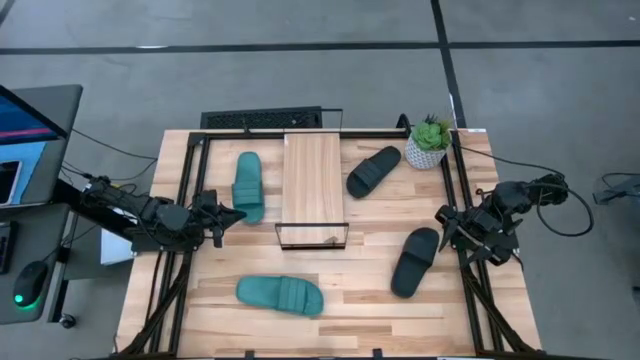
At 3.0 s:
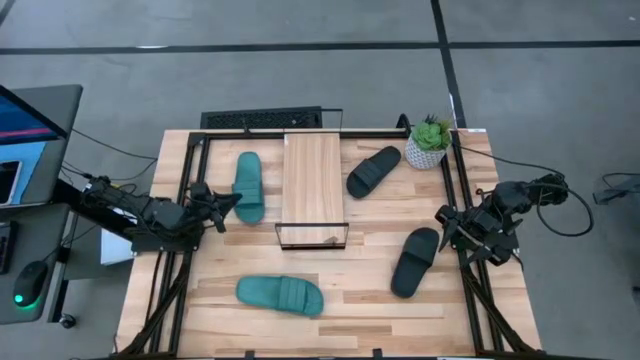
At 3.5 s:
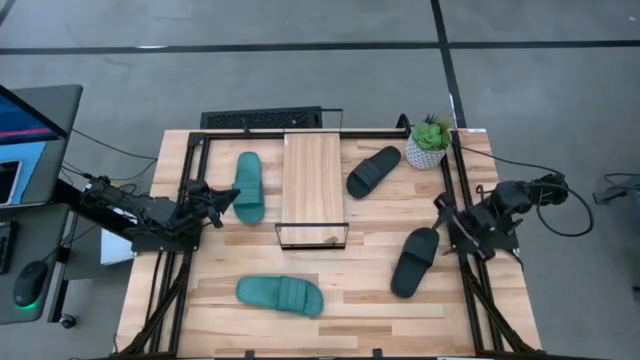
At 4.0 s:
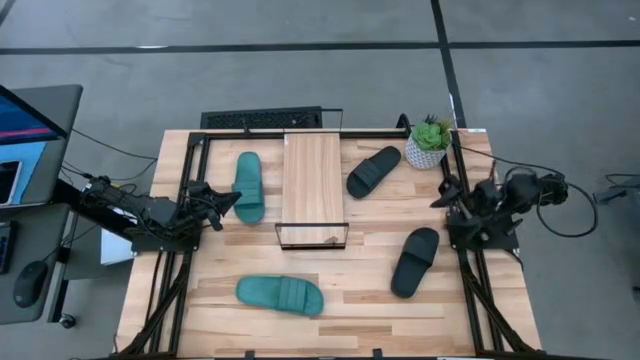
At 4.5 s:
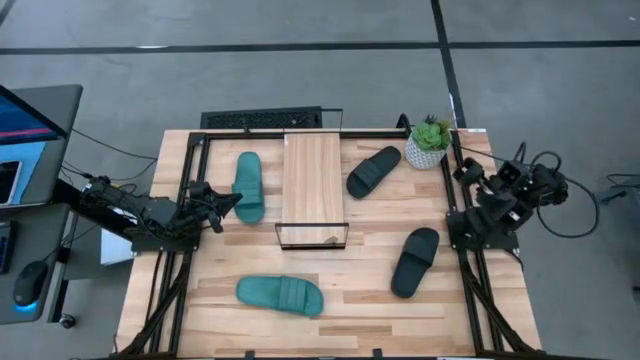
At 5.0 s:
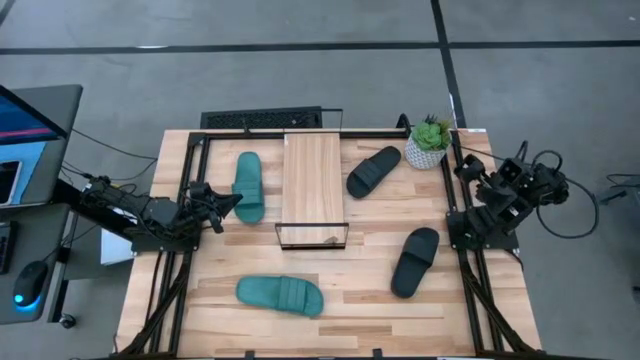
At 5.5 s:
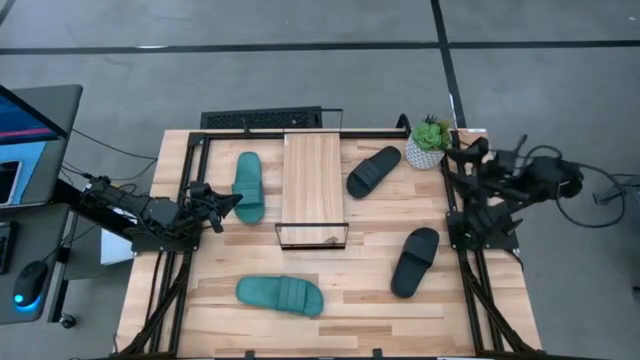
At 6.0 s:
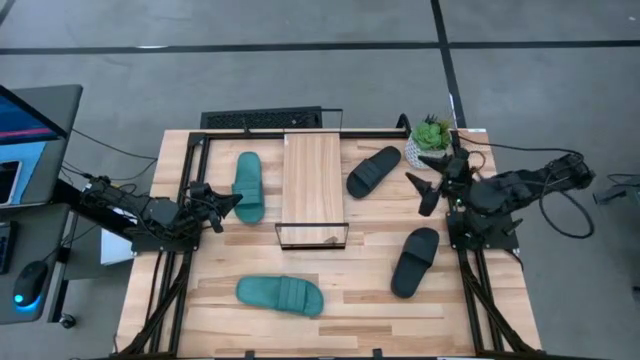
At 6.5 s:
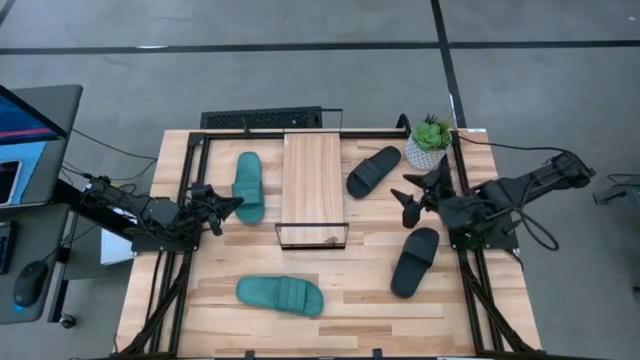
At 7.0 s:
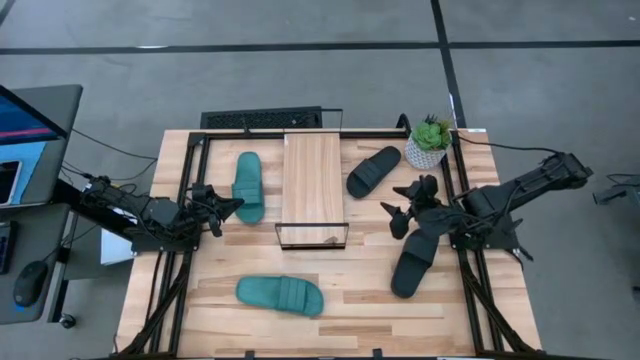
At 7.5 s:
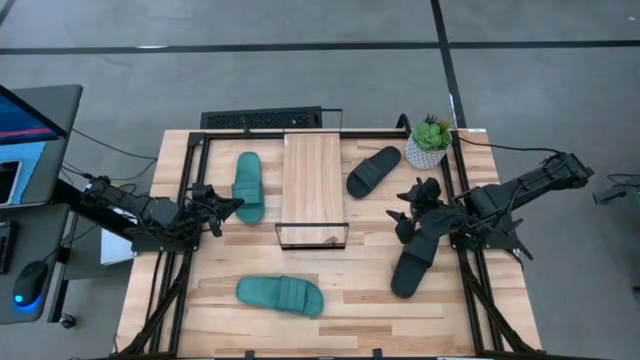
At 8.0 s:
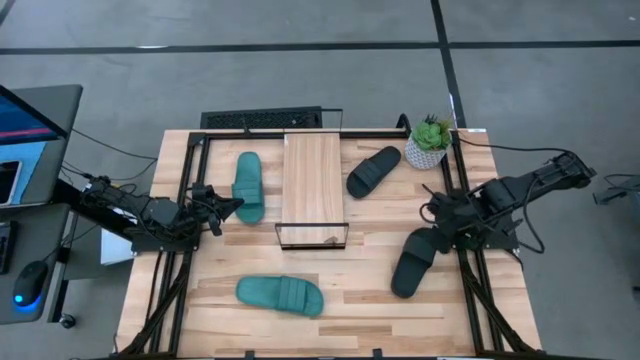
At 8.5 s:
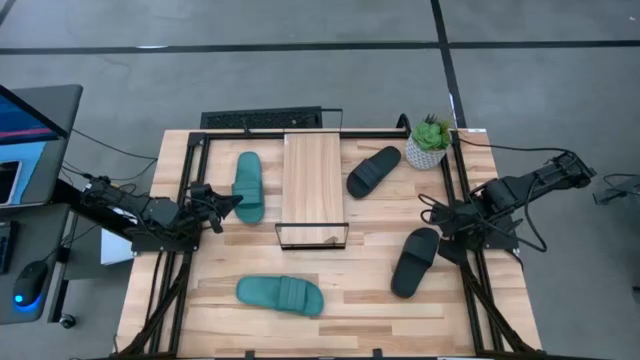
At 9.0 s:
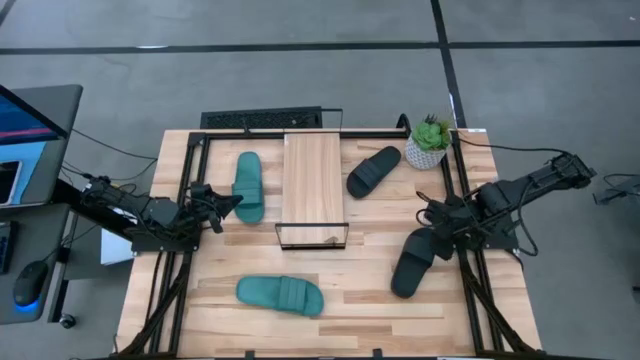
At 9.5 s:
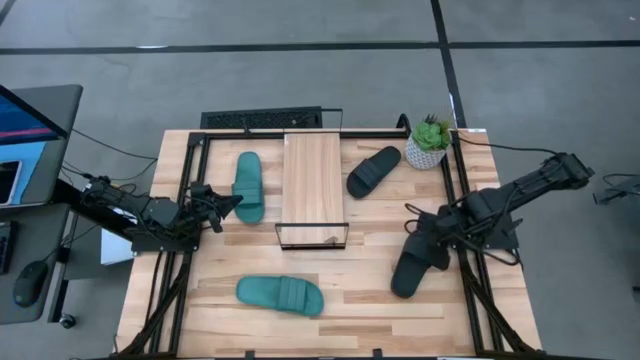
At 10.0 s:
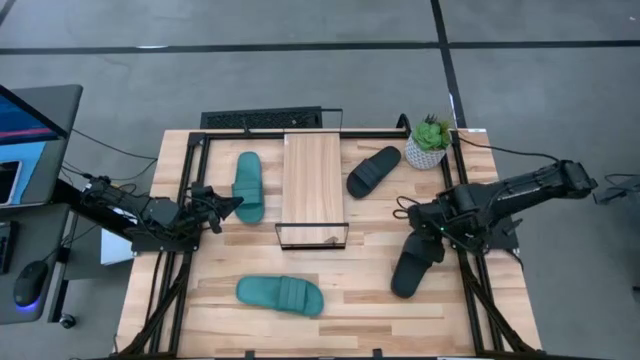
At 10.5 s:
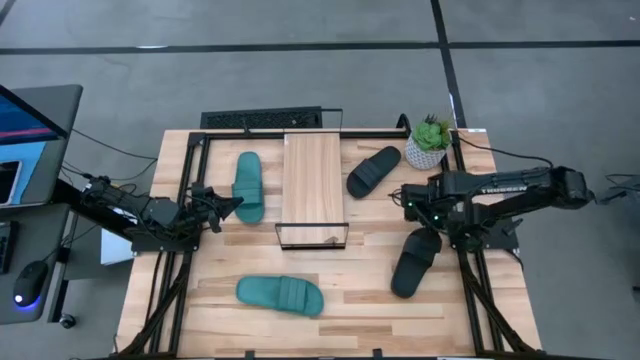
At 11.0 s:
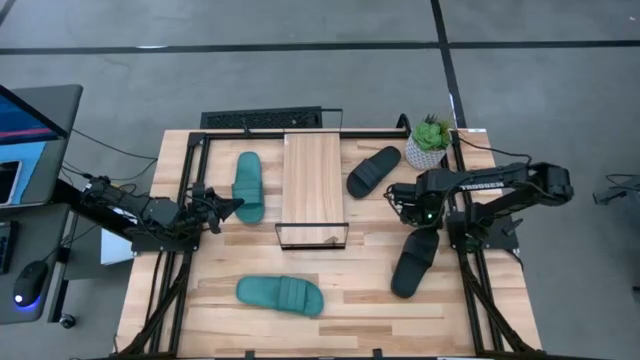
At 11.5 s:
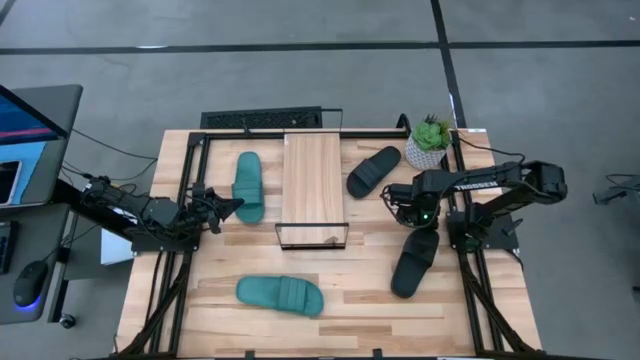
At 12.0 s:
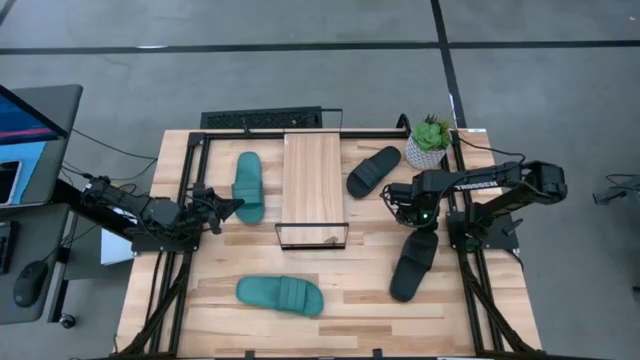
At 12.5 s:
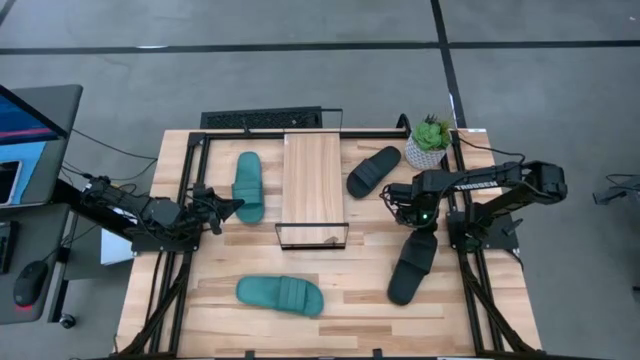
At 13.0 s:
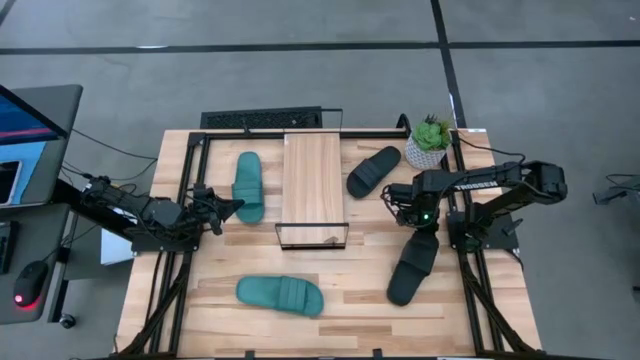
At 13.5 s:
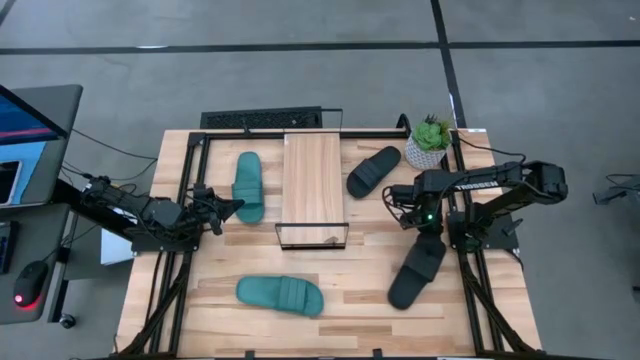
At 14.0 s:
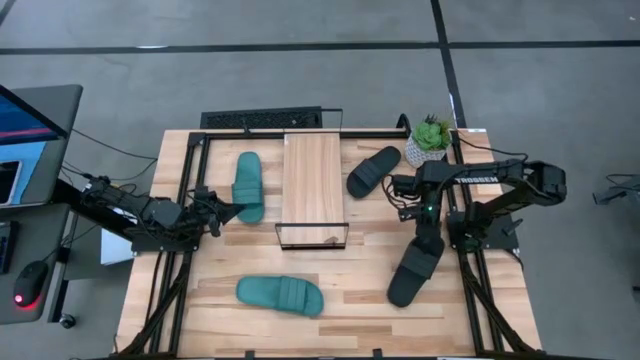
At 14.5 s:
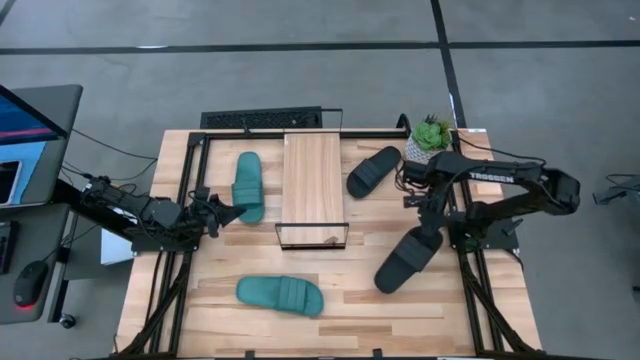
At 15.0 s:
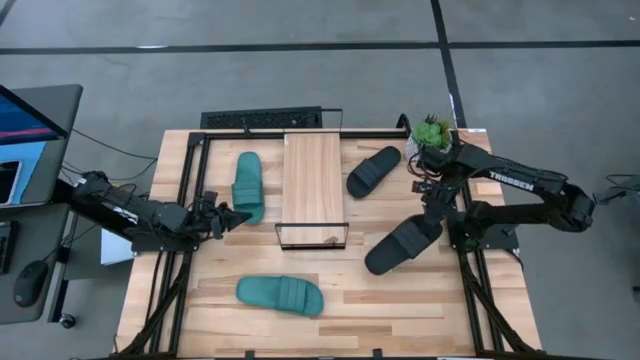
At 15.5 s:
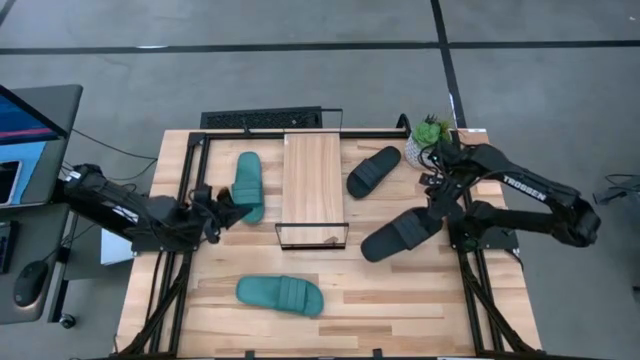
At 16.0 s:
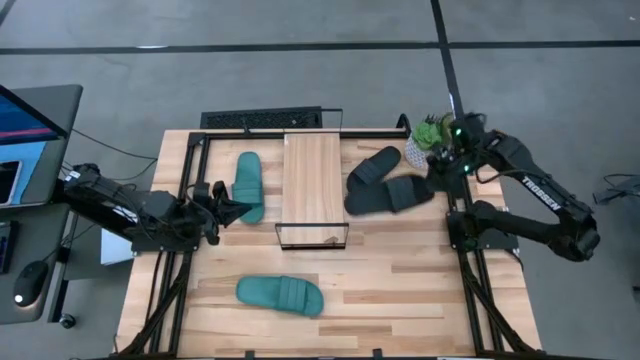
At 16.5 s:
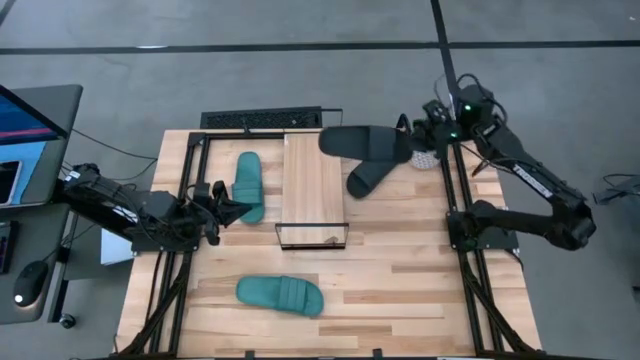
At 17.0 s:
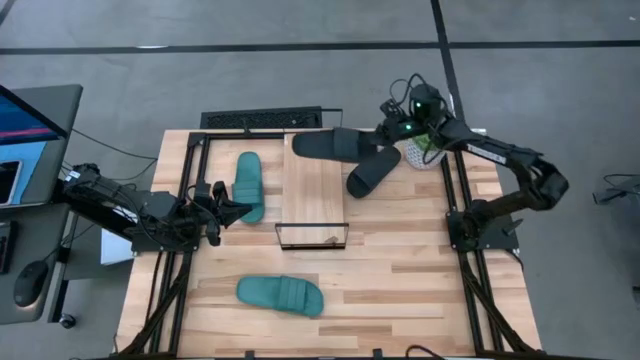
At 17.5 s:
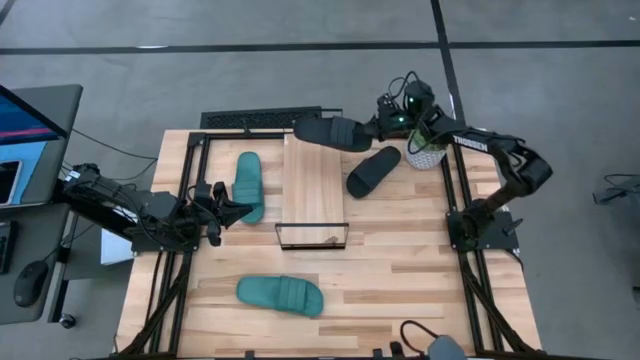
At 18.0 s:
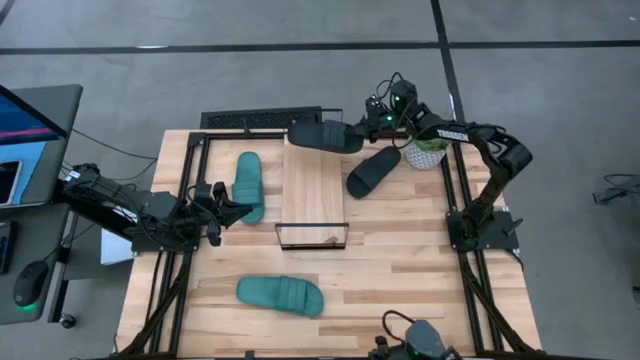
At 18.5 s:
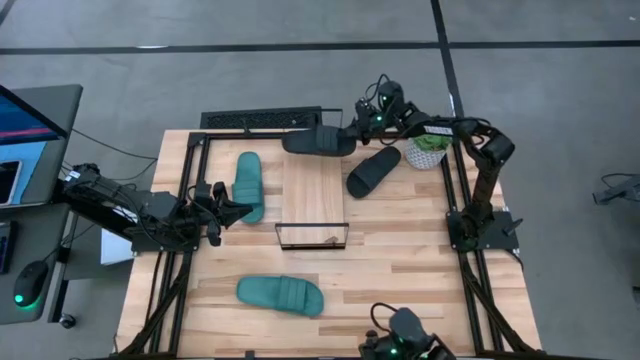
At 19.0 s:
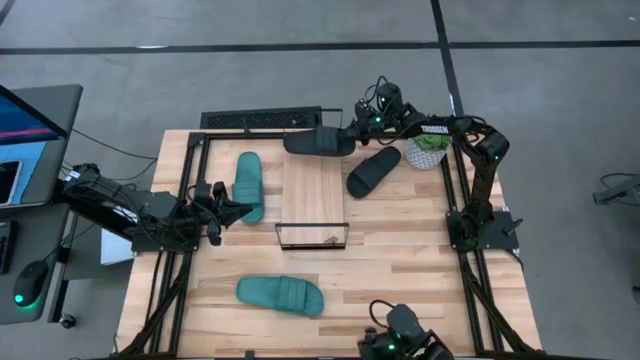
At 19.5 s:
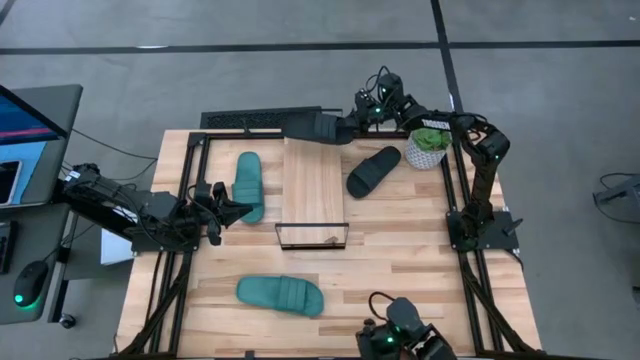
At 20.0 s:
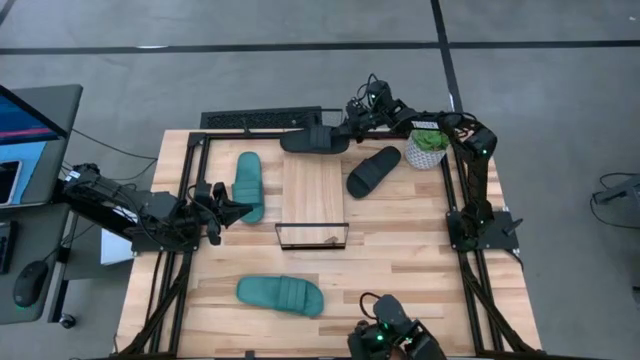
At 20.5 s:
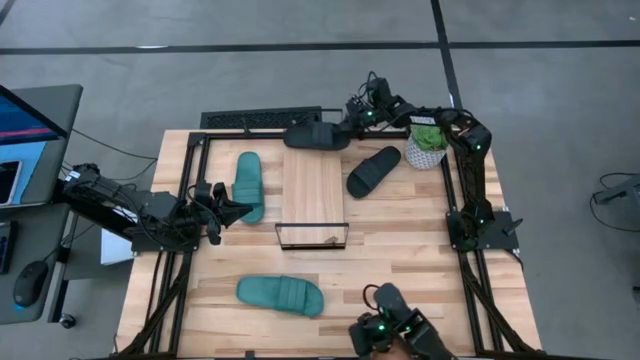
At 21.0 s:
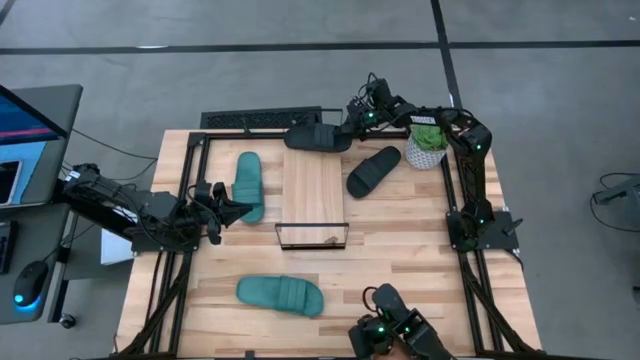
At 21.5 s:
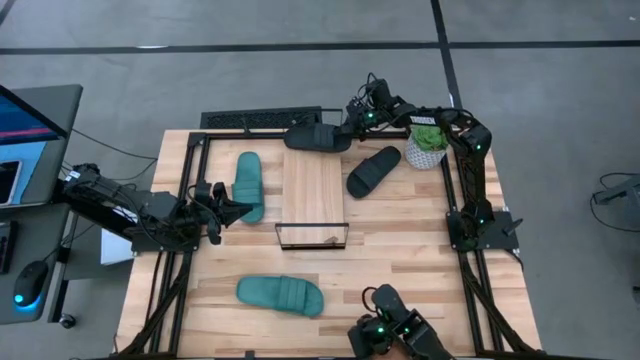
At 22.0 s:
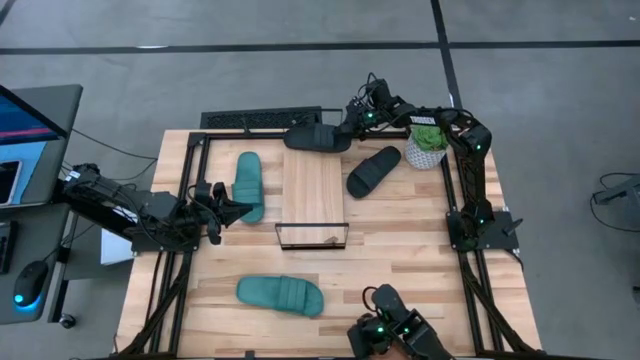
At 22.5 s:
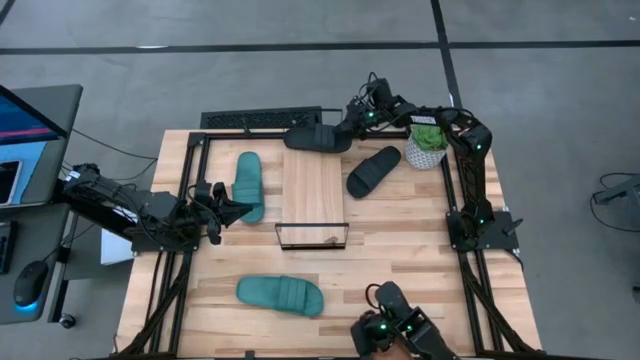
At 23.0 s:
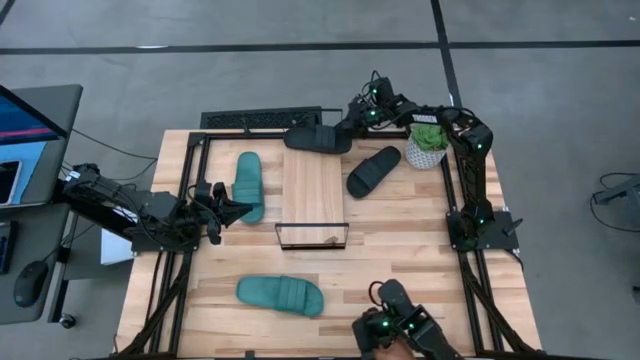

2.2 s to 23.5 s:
Task: Pick and place slides into the shelf
Put the bottom black slides on the shelf
